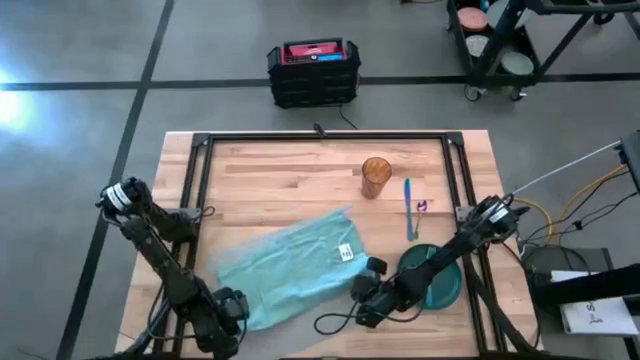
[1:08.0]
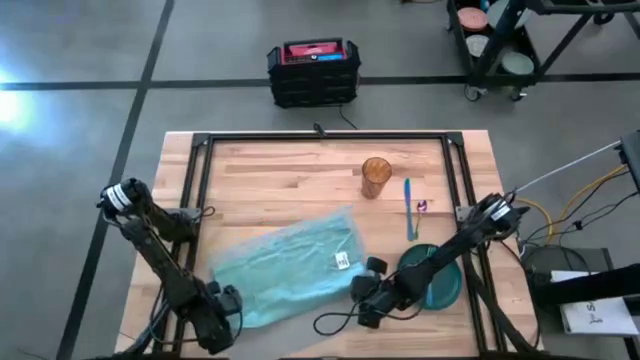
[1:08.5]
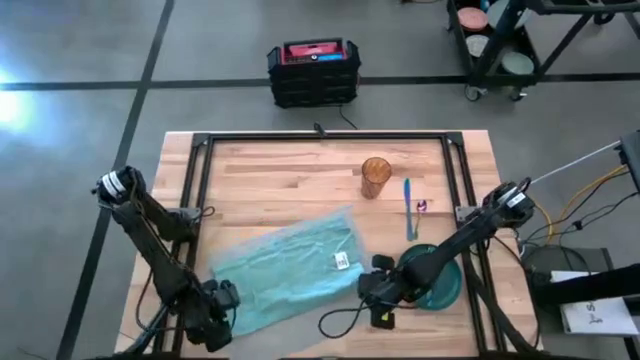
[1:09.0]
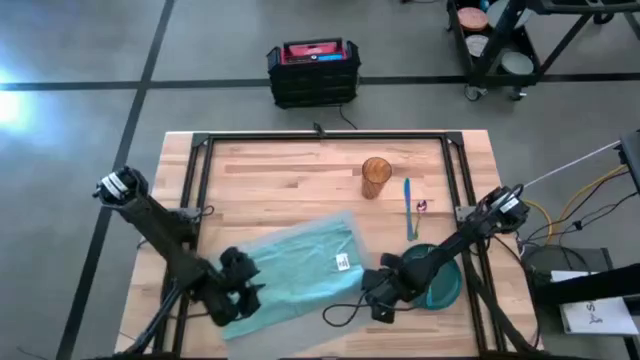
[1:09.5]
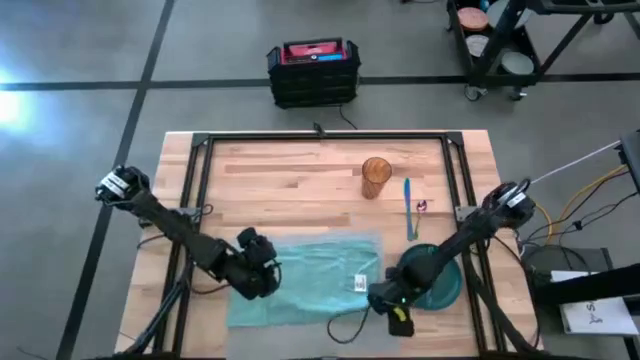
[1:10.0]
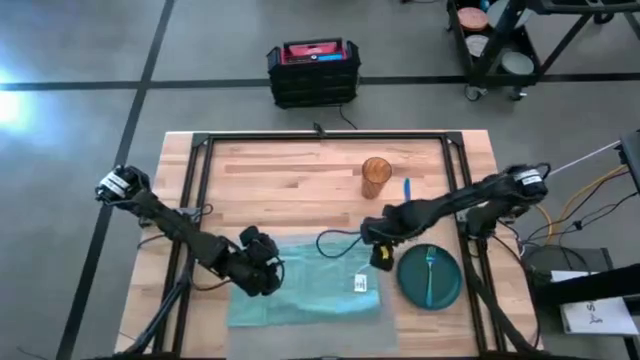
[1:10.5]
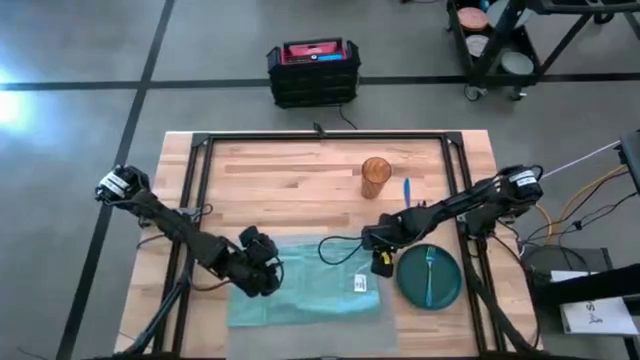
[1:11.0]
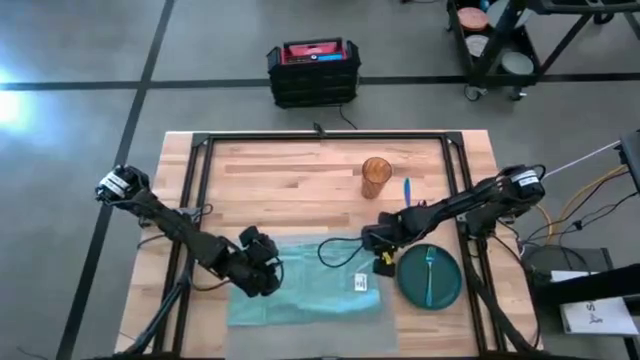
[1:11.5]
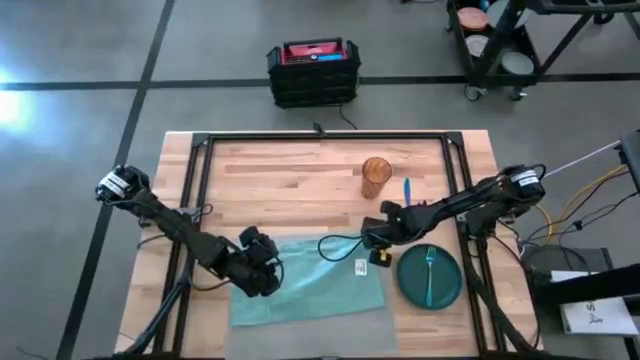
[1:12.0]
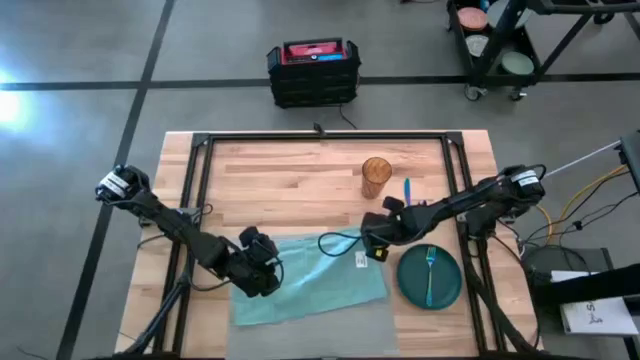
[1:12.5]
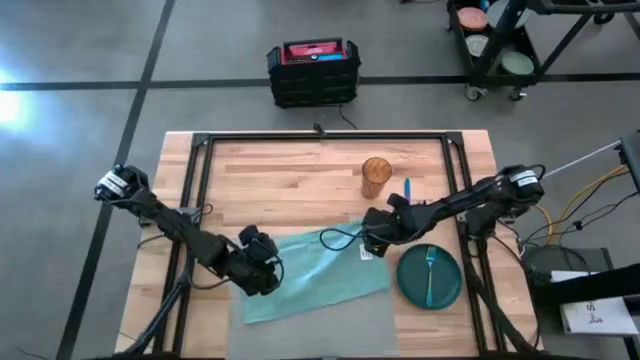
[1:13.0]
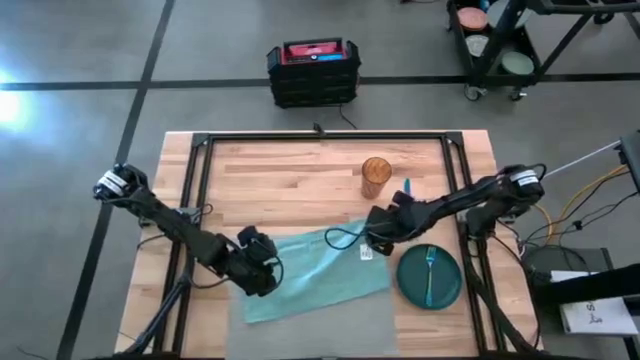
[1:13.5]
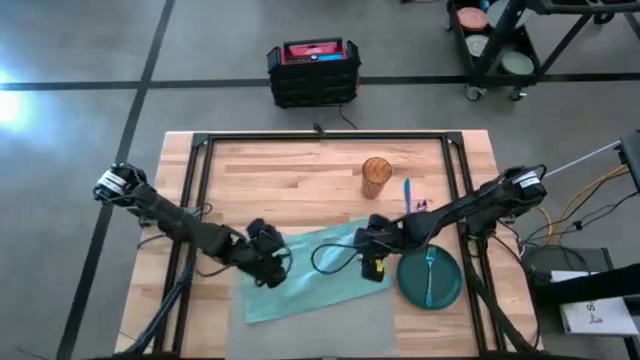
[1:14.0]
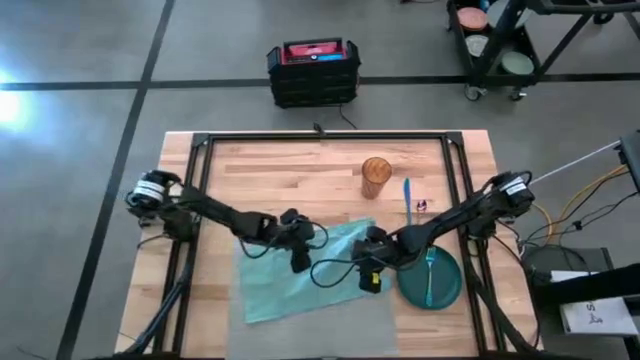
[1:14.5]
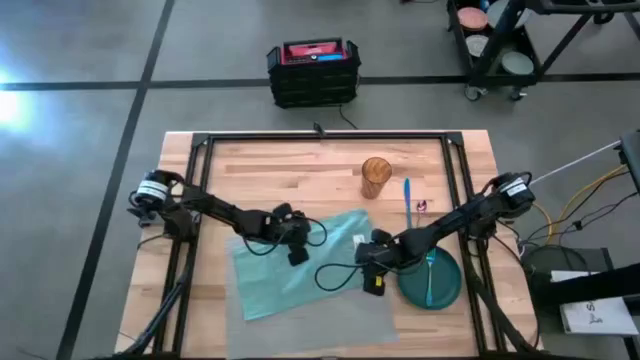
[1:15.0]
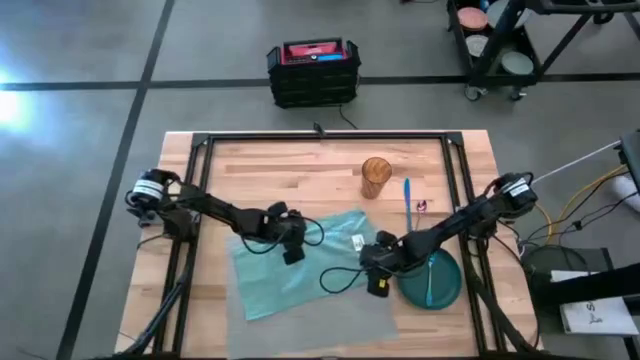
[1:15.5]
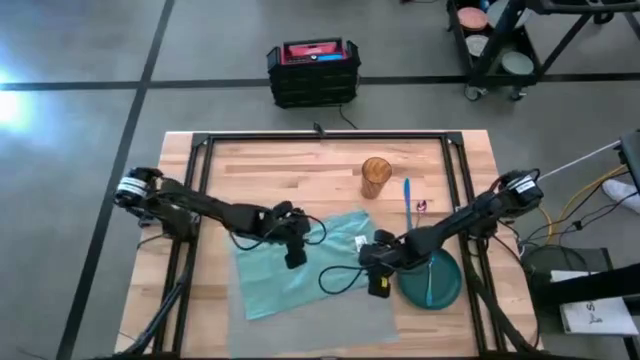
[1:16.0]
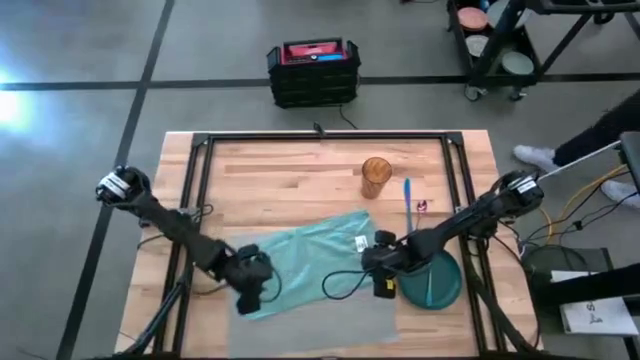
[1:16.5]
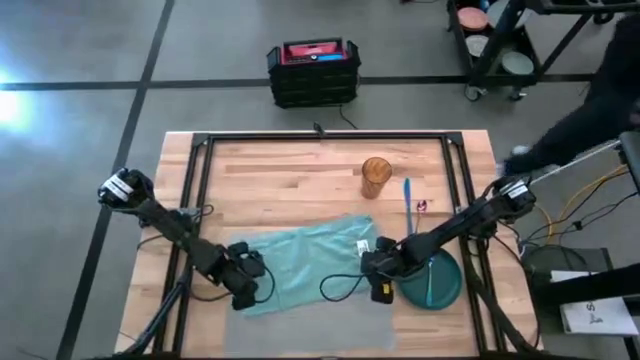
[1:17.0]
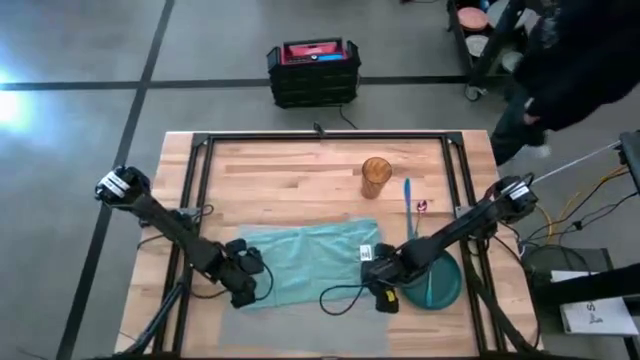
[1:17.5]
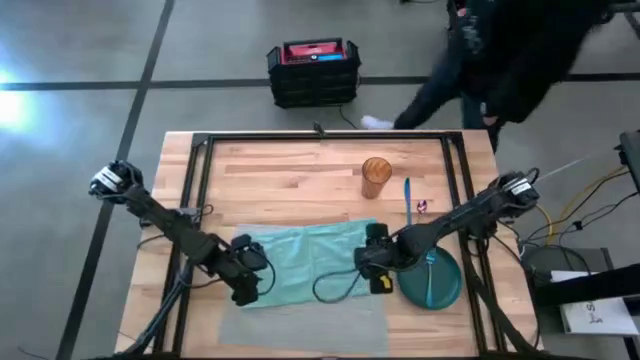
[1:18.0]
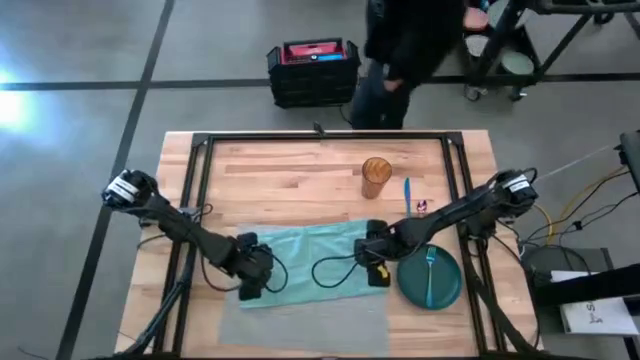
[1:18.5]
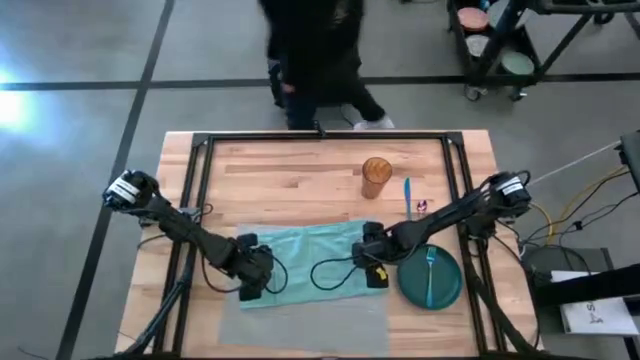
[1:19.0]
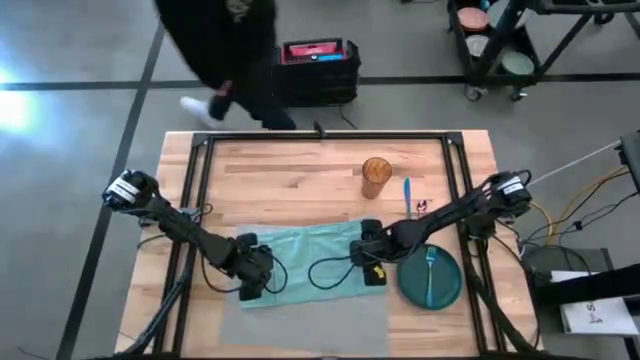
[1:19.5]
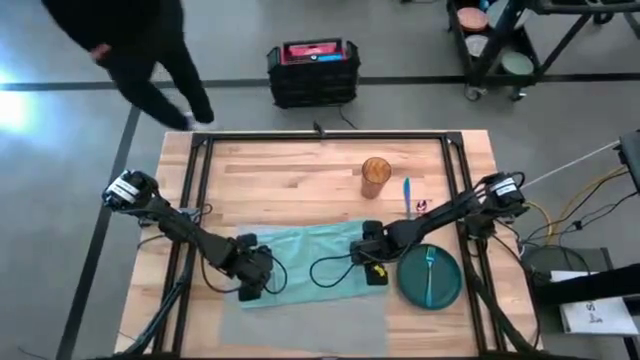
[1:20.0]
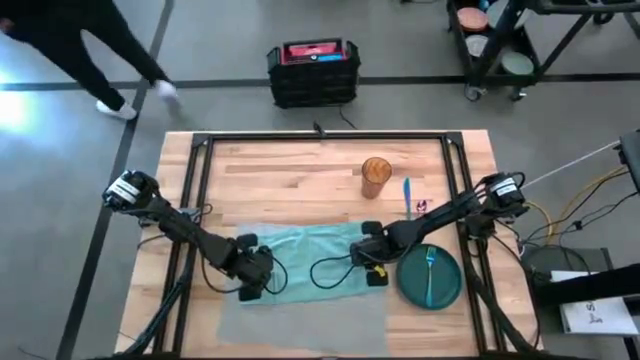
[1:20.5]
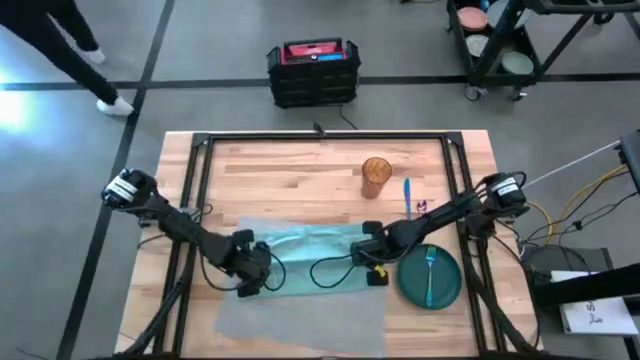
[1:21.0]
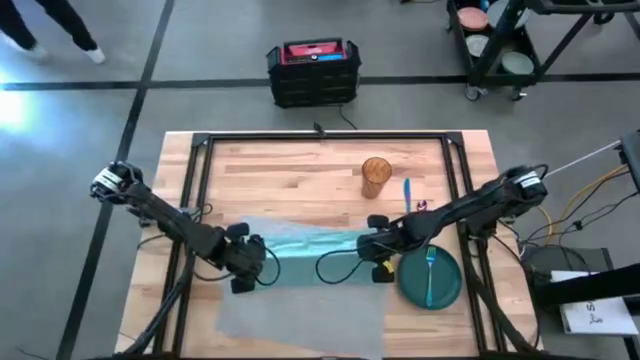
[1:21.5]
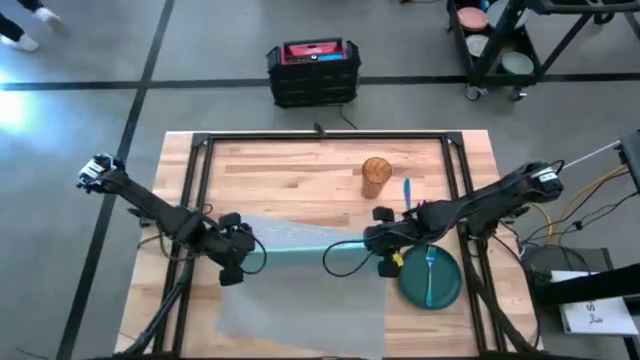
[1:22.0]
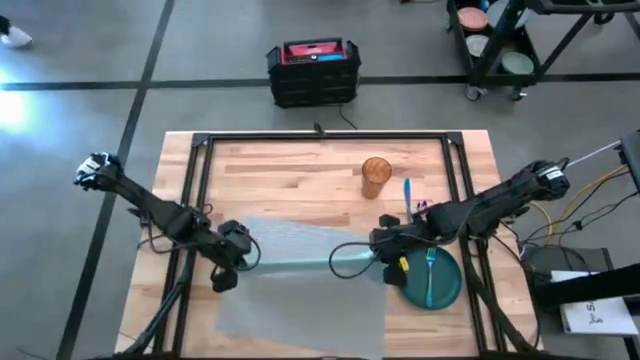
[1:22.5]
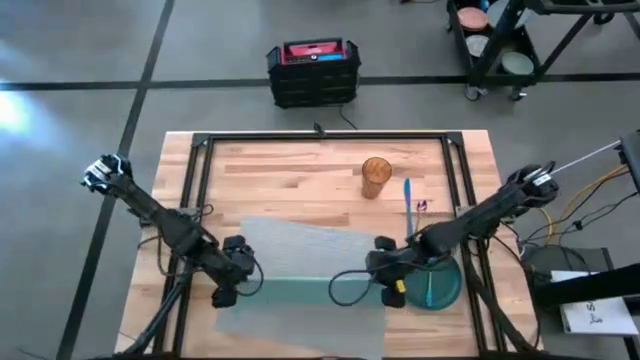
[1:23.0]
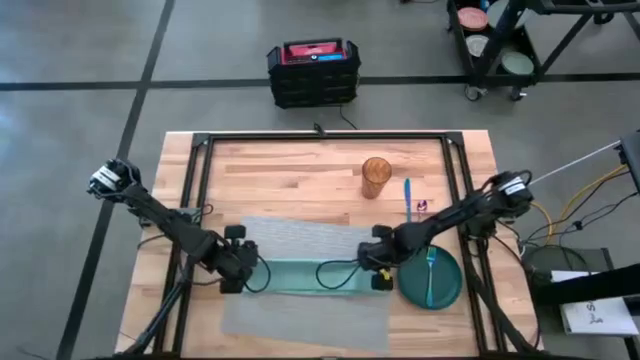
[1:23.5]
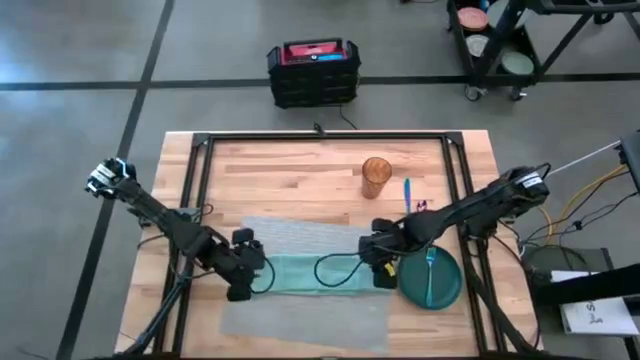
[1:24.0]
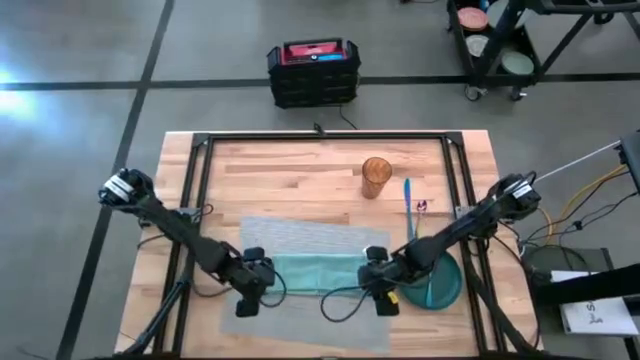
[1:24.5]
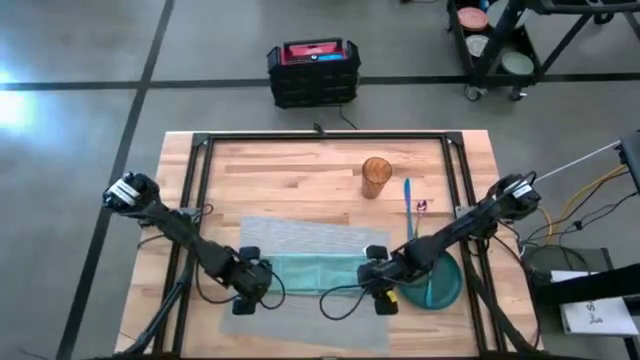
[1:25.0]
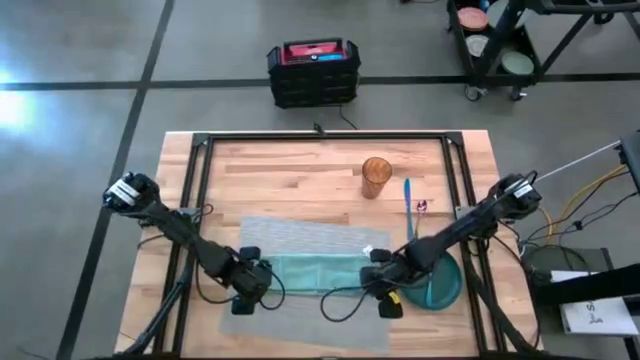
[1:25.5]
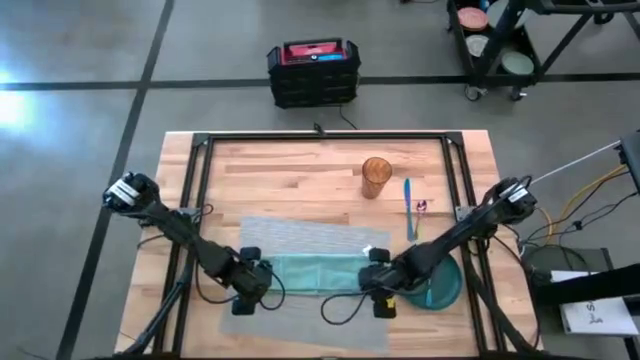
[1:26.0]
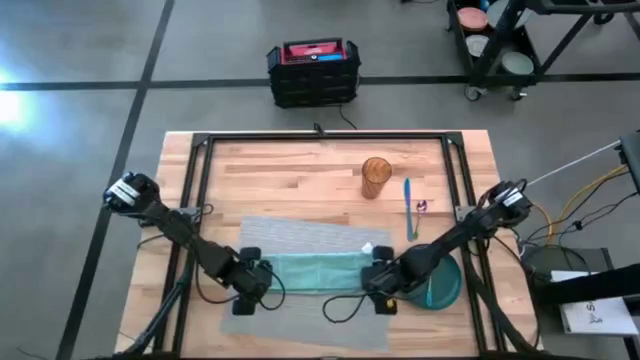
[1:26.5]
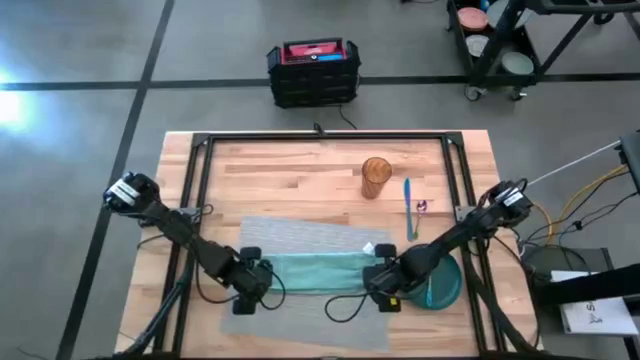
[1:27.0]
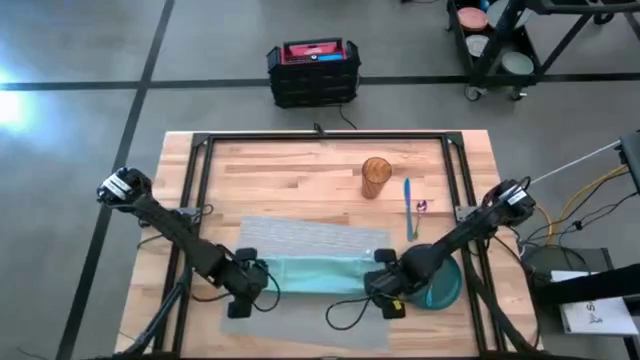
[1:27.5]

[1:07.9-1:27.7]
Task: Set table place
Fold the blue table napkin

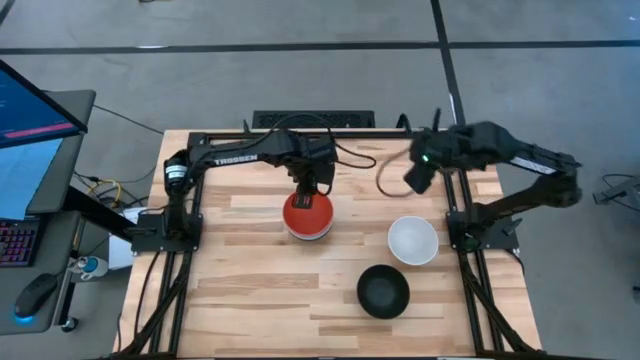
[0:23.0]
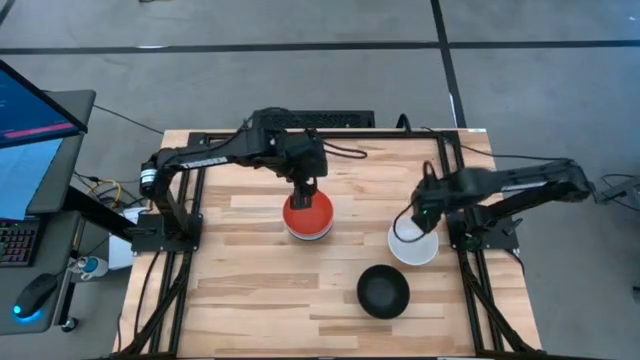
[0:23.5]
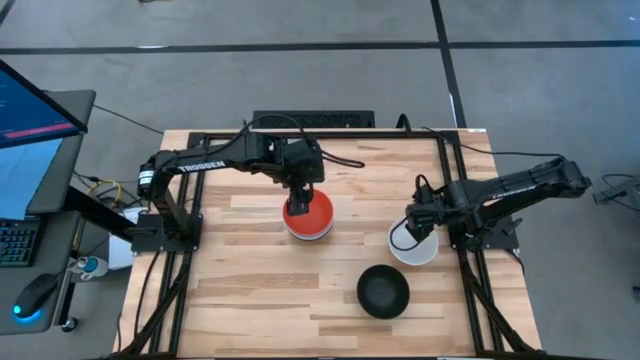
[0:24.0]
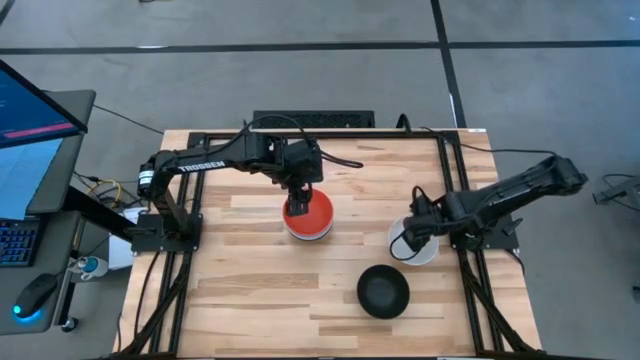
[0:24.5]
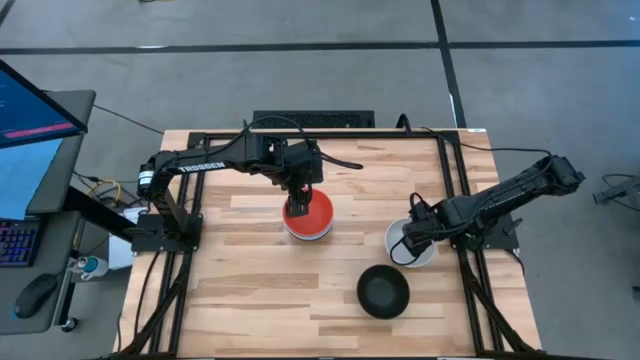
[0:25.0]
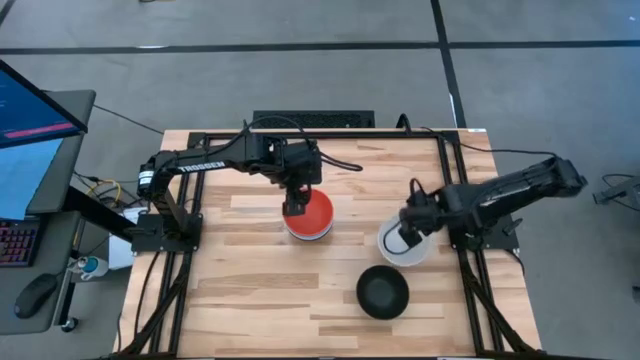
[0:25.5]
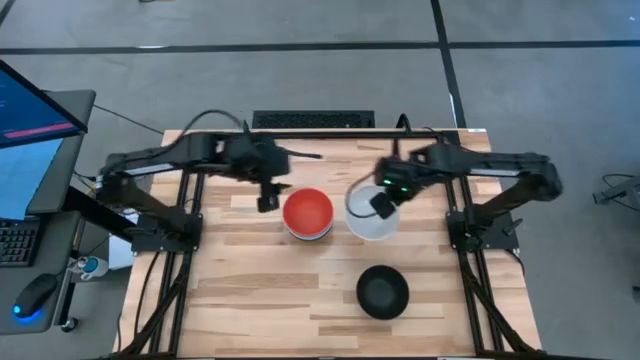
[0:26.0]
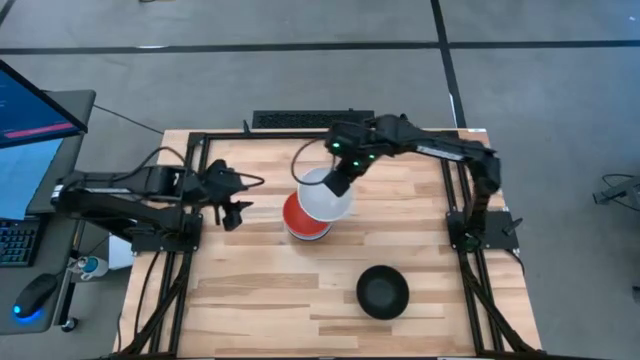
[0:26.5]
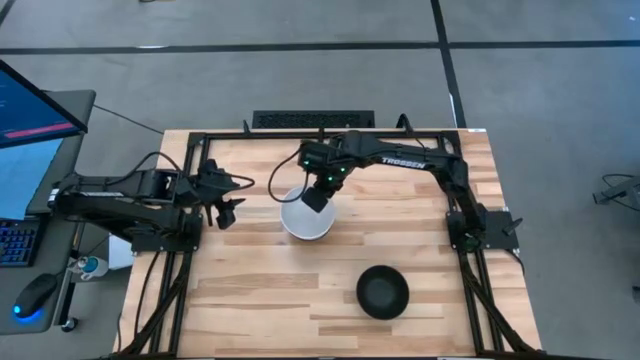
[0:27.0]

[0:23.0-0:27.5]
Task: Nest bowls inside each other
Stack the white bowl on the orange bowl
